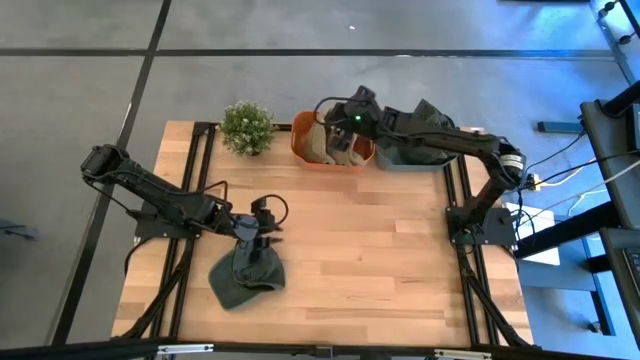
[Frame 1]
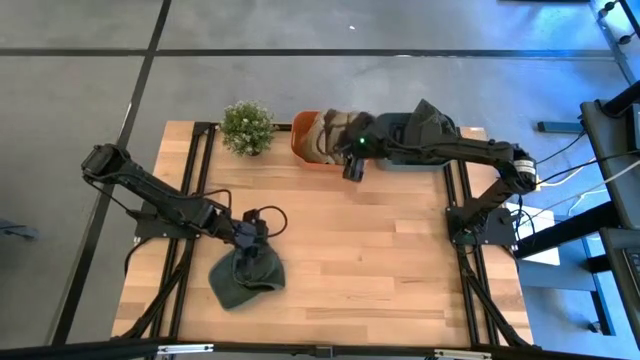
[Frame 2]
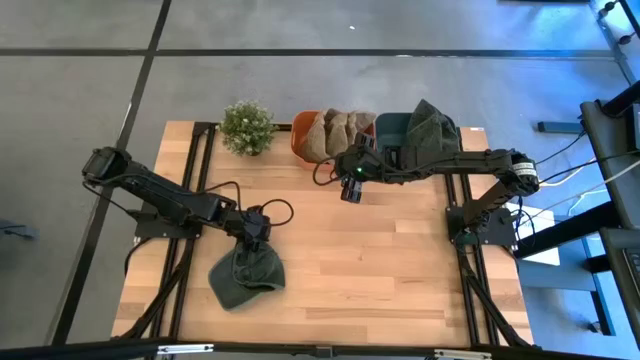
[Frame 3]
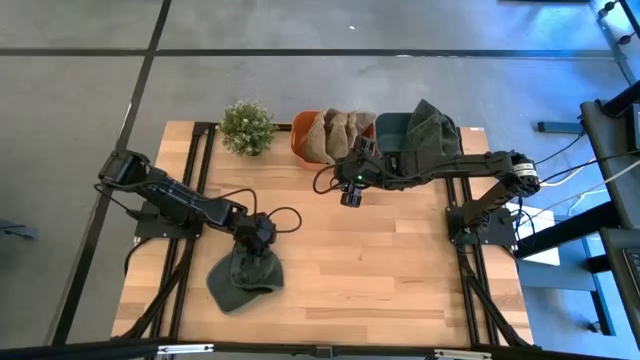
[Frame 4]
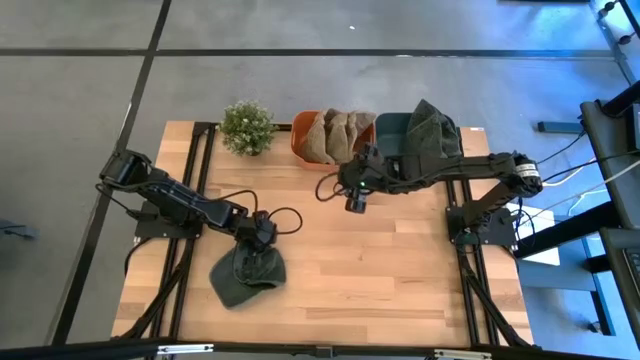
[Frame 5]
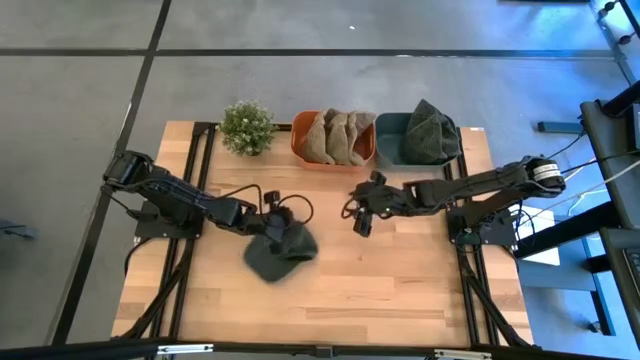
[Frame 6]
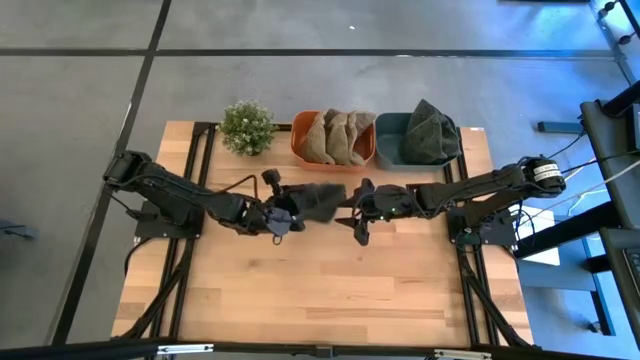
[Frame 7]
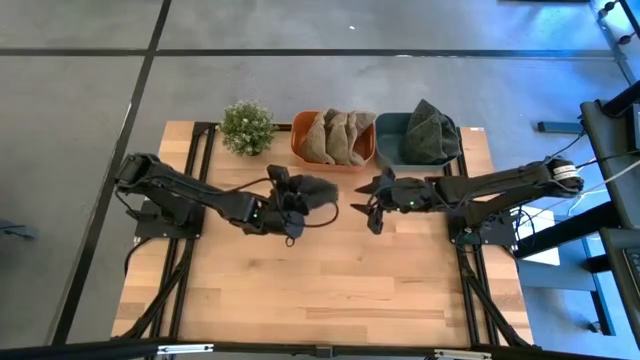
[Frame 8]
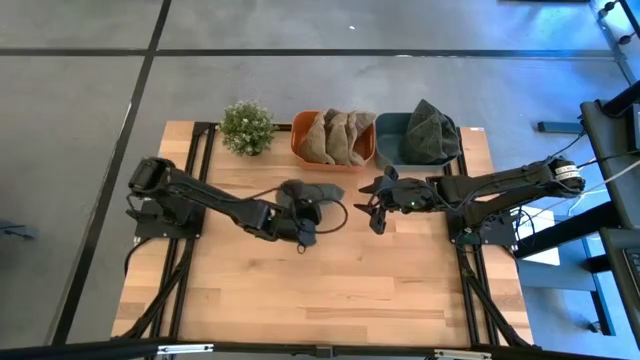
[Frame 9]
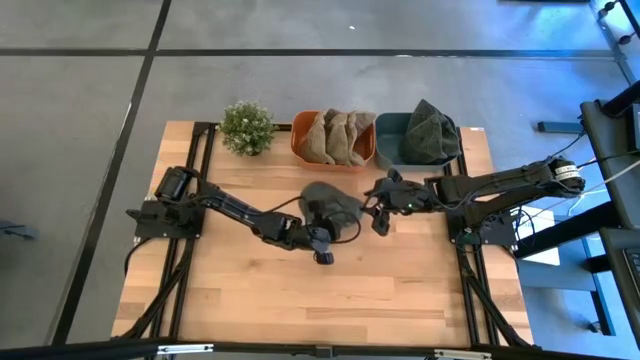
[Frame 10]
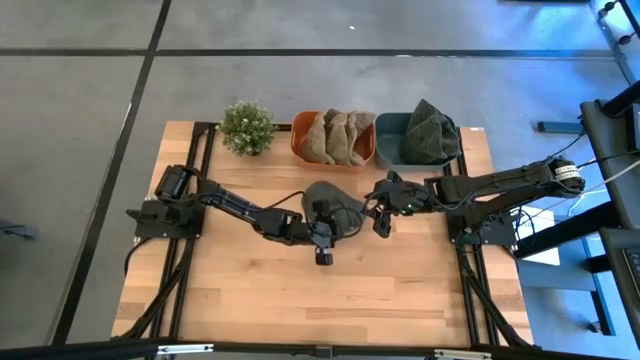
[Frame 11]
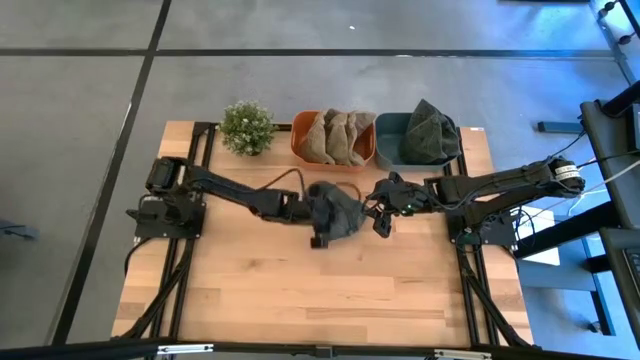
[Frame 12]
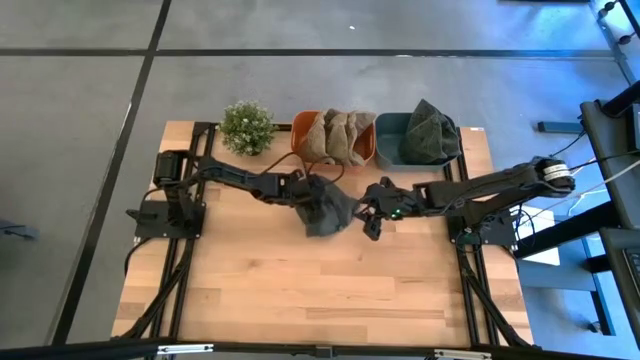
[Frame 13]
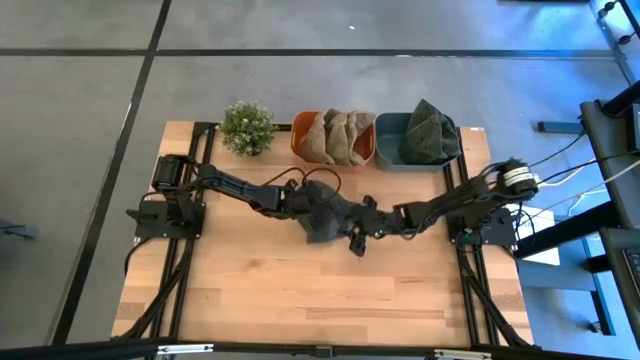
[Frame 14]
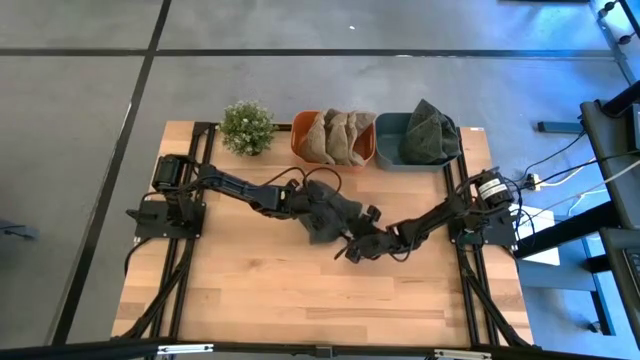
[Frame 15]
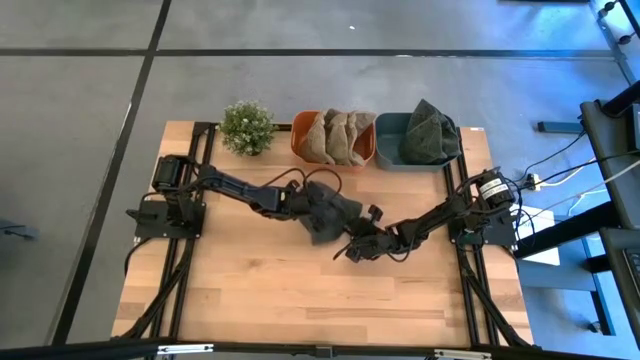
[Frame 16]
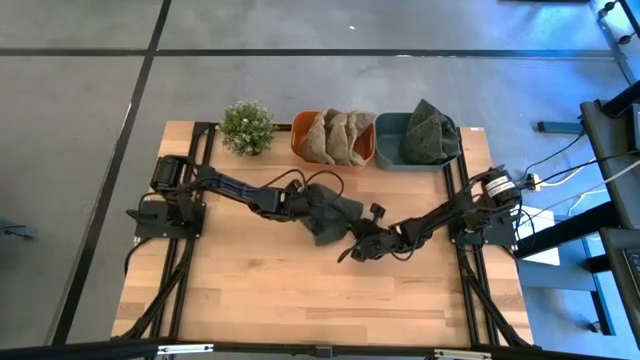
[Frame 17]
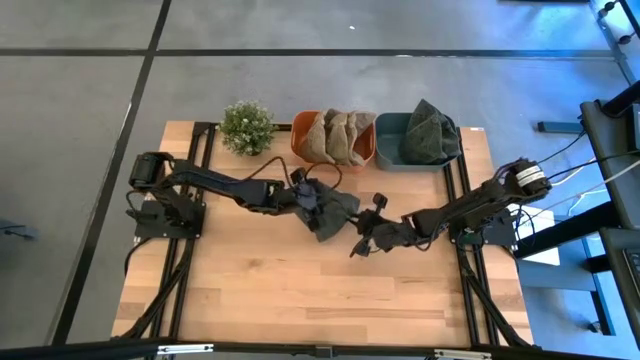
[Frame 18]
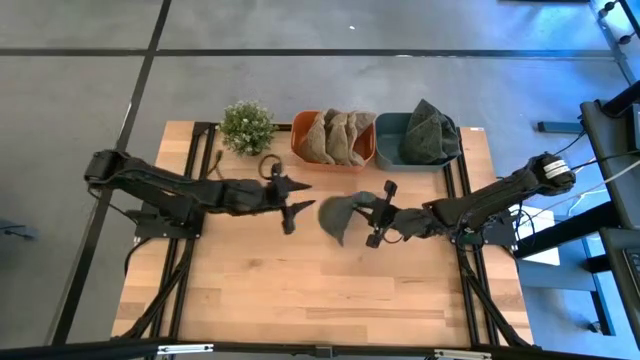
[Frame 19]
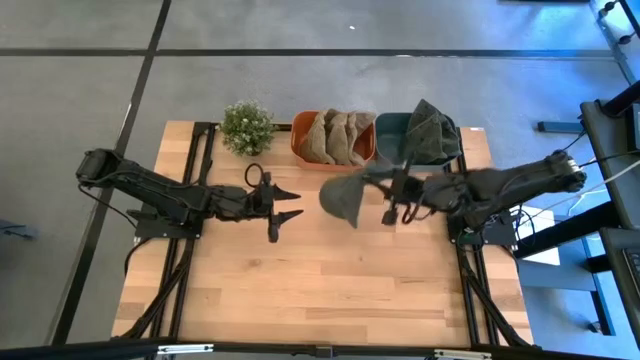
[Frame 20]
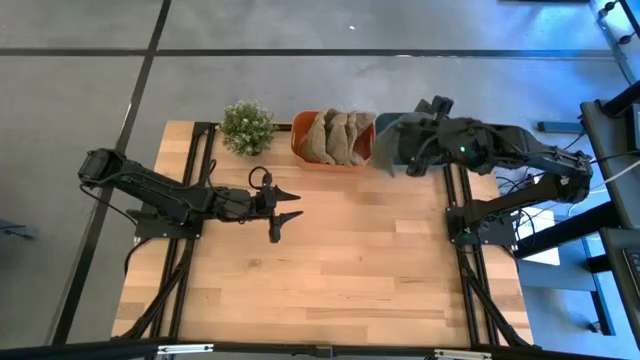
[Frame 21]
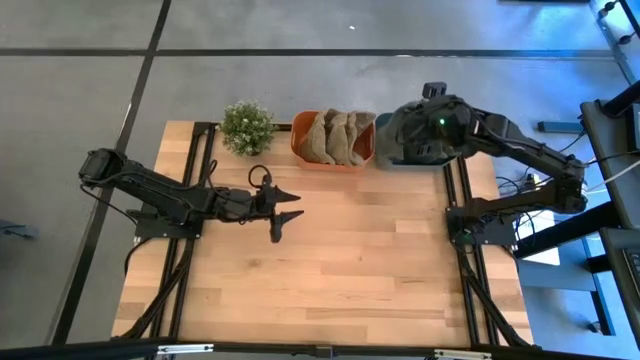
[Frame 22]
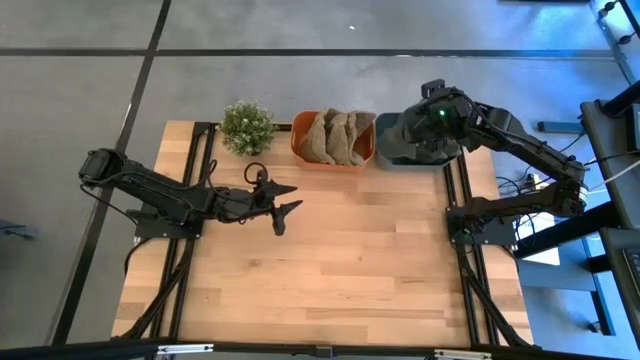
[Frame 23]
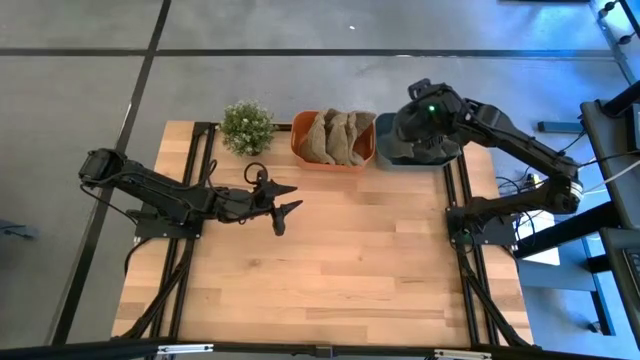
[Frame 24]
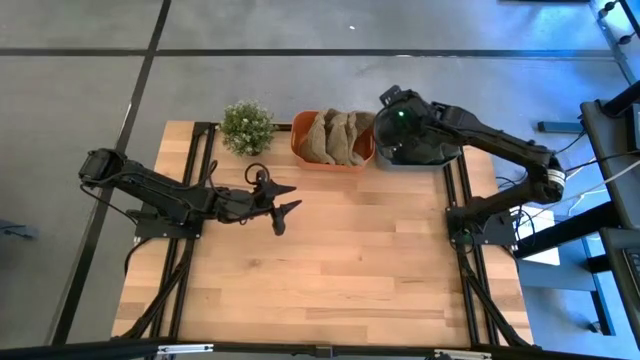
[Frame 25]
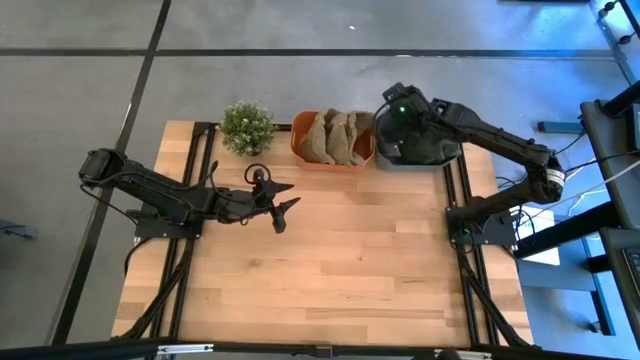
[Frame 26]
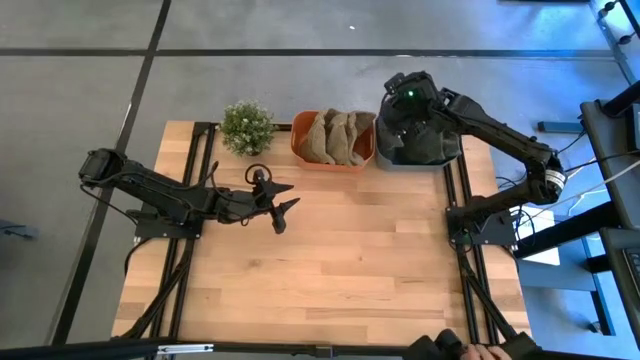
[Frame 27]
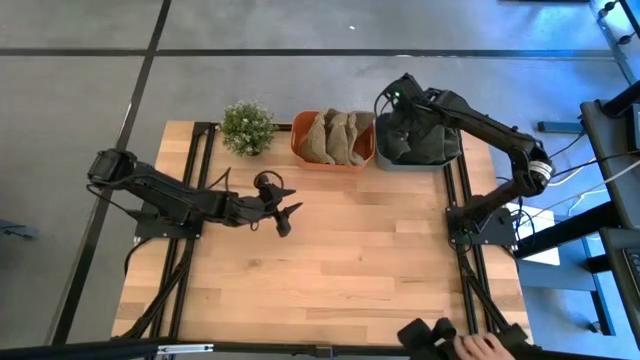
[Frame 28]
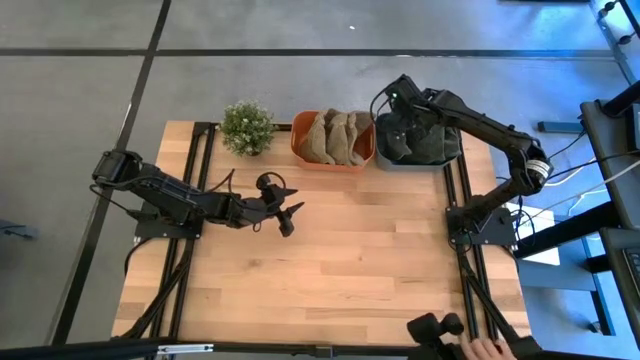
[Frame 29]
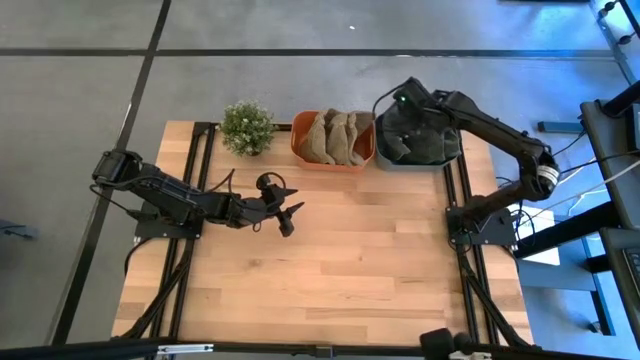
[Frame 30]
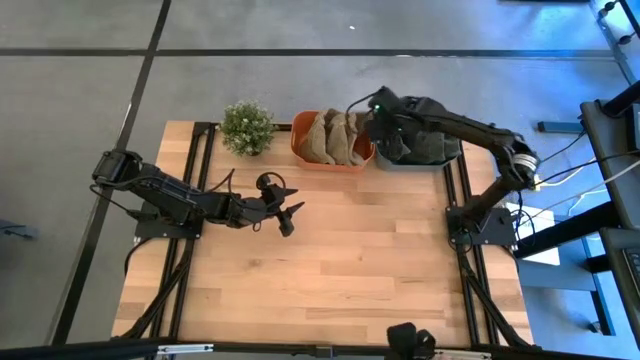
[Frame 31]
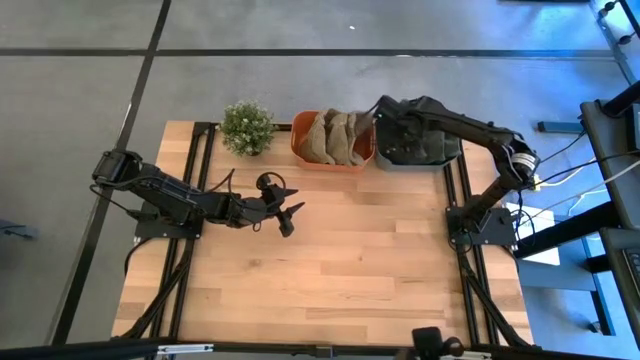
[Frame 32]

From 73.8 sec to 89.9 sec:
Task: Pick & Place hat
Put the black cap into the blue bin

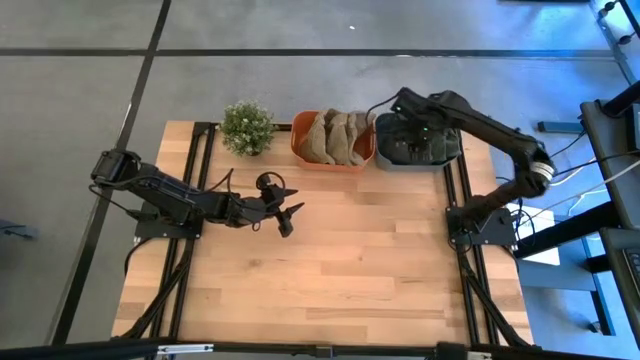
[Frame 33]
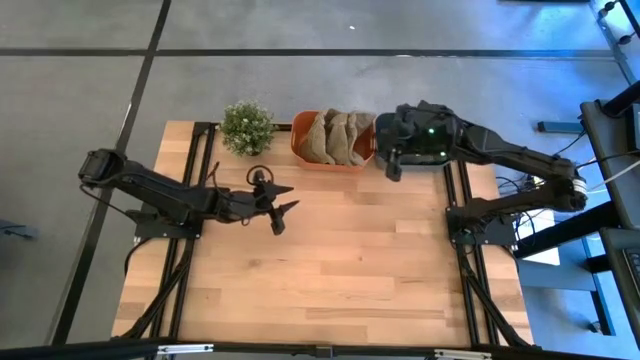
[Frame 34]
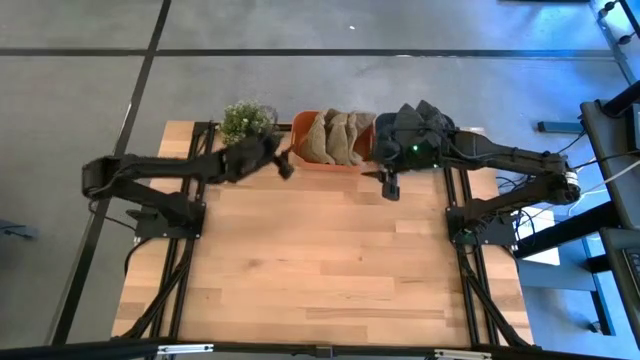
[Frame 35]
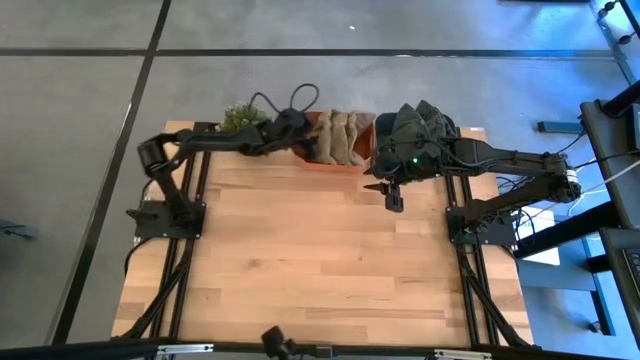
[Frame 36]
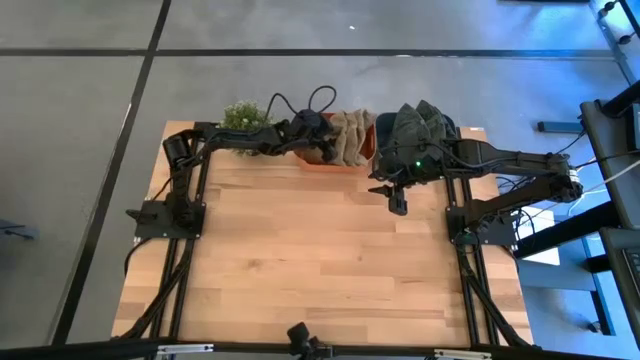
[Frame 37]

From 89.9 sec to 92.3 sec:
Adjust the brown cap in the orange bin

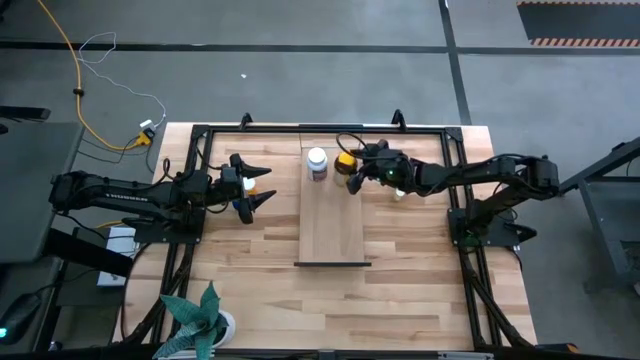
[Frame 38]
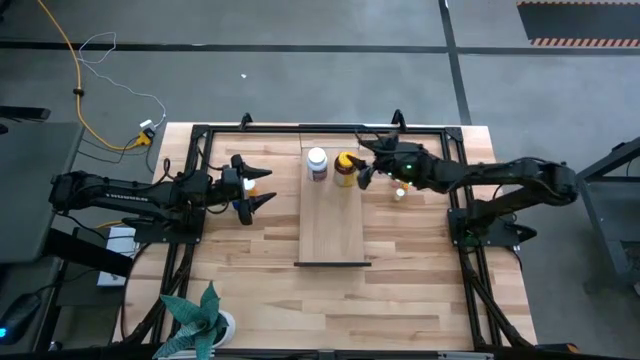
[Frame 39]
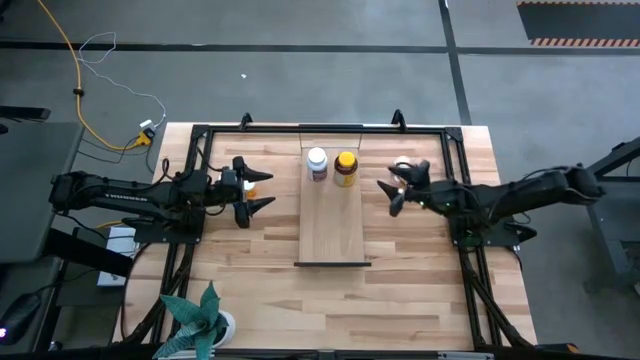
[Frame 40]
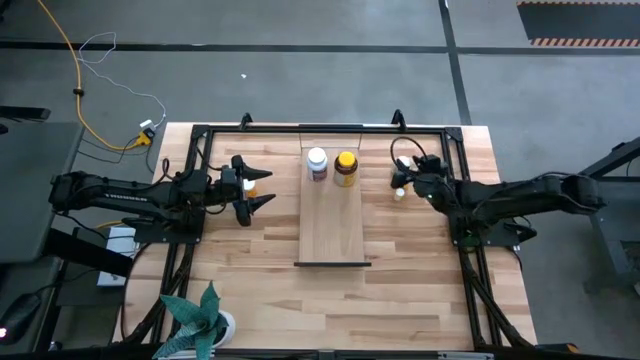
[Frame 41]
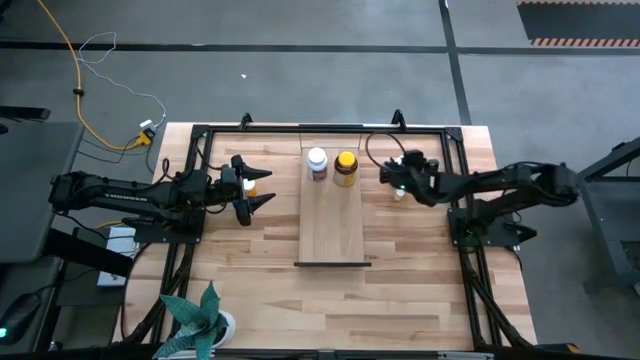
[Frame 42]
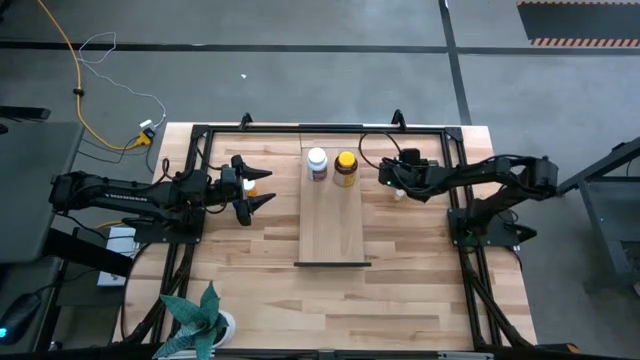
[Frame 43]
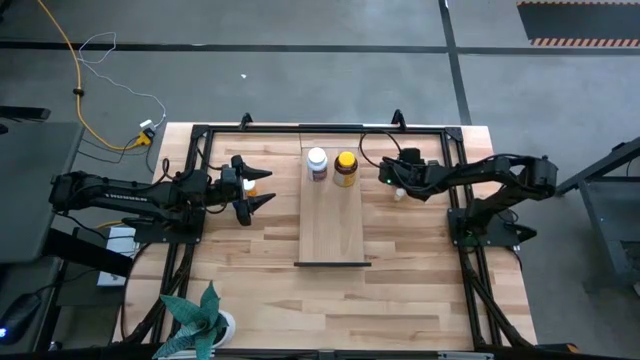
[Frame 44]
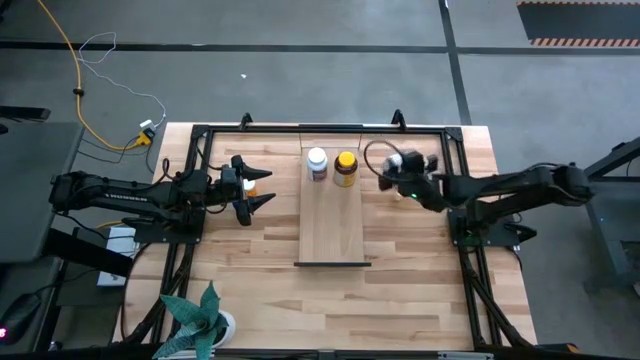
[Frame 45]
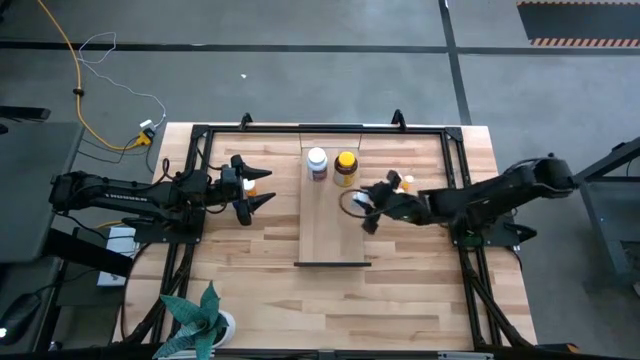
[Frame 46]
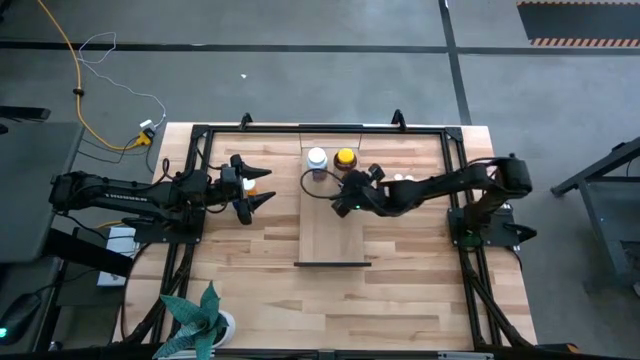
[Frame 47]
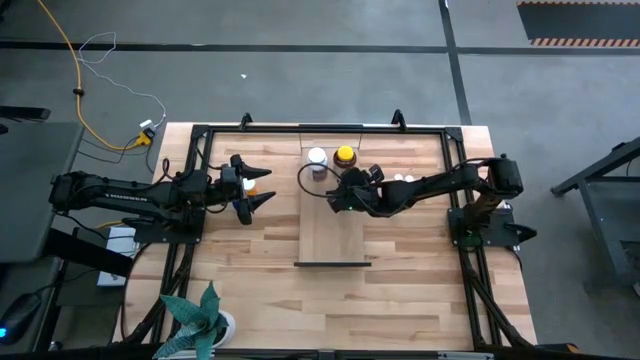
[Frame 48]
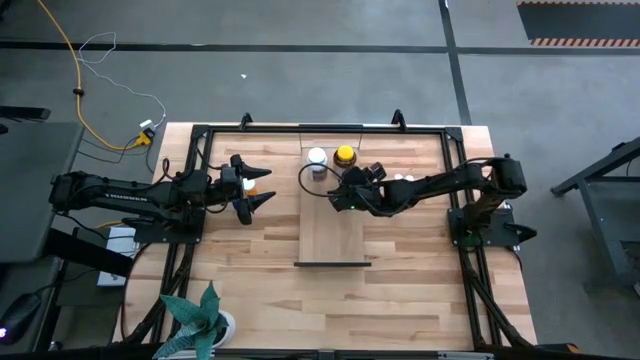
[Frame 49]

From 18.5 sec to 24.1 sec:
Task: Pick and place medicine bottles onto shelf by color
Put the white blue pill bottle on the shelf
